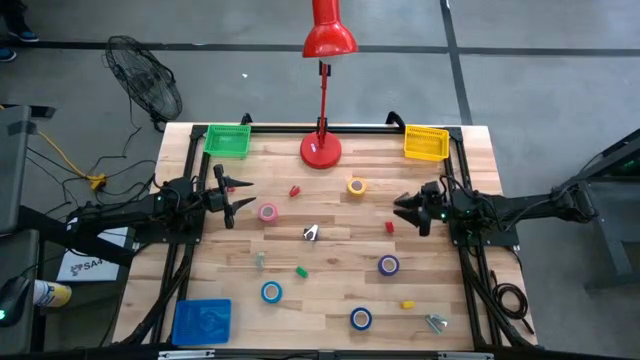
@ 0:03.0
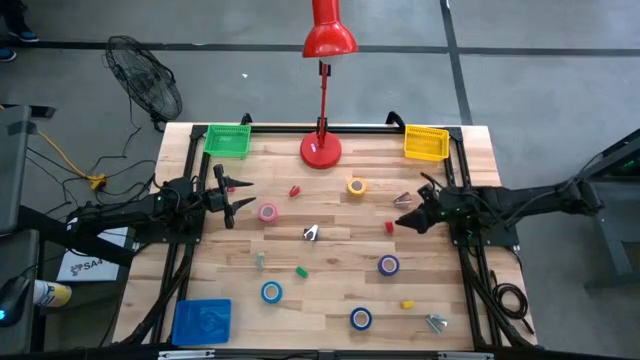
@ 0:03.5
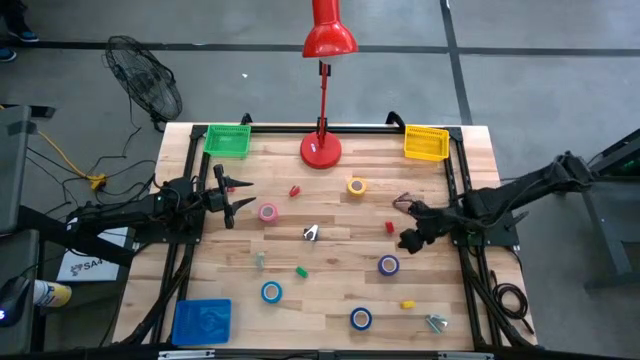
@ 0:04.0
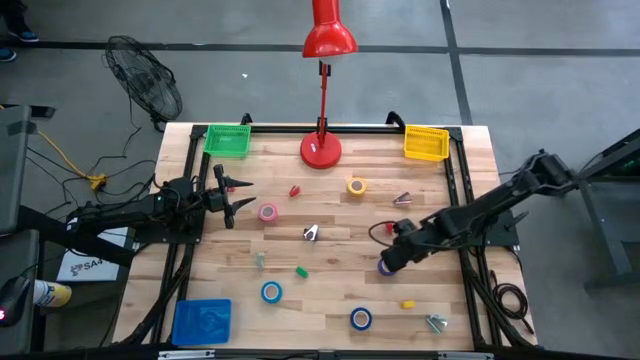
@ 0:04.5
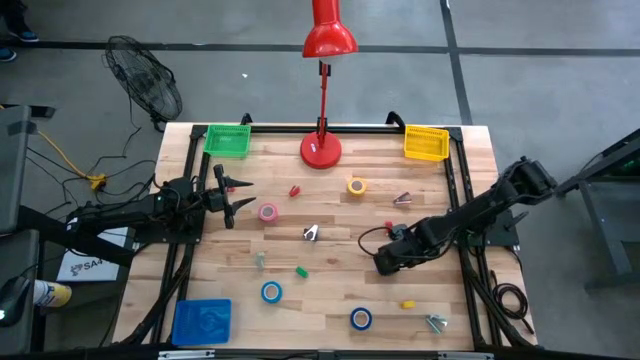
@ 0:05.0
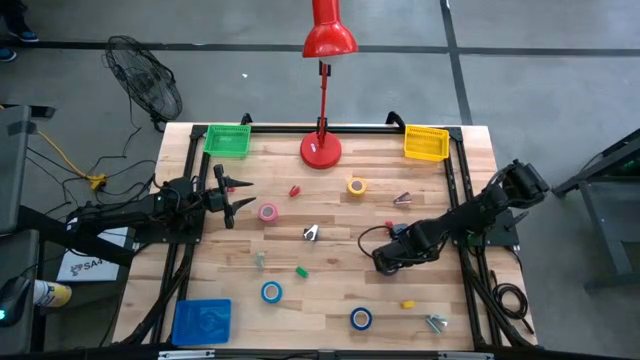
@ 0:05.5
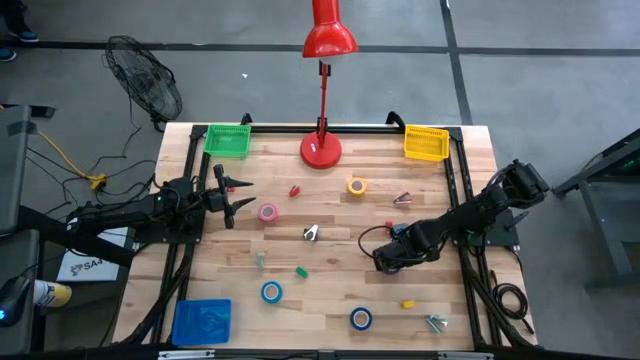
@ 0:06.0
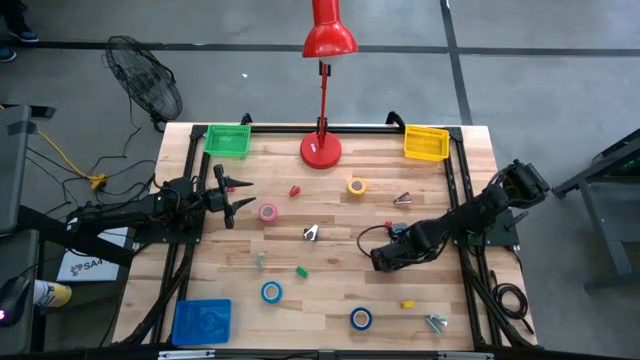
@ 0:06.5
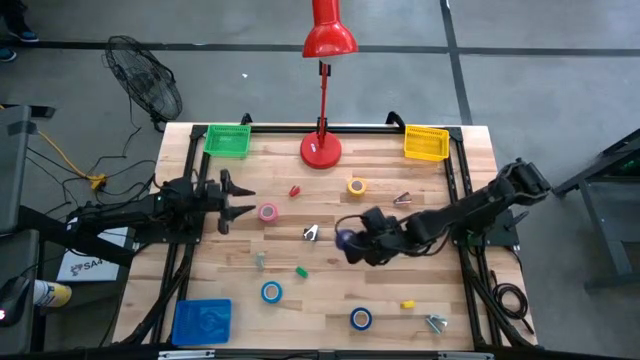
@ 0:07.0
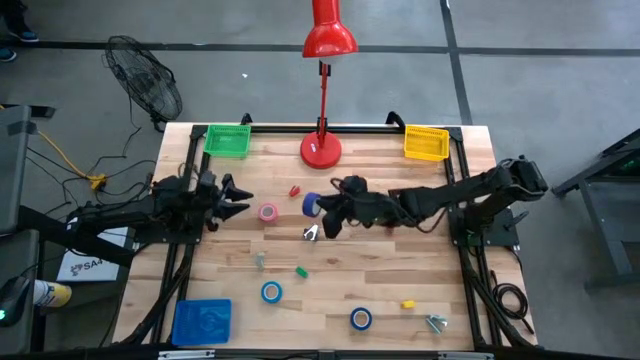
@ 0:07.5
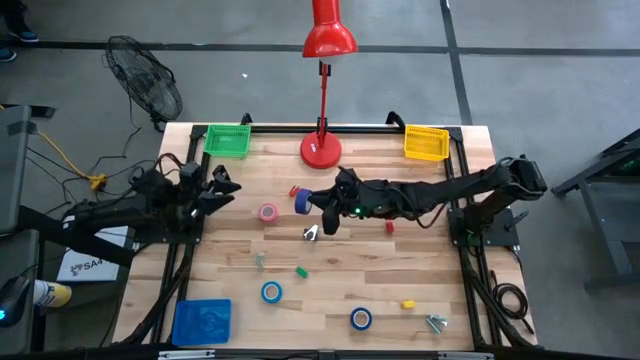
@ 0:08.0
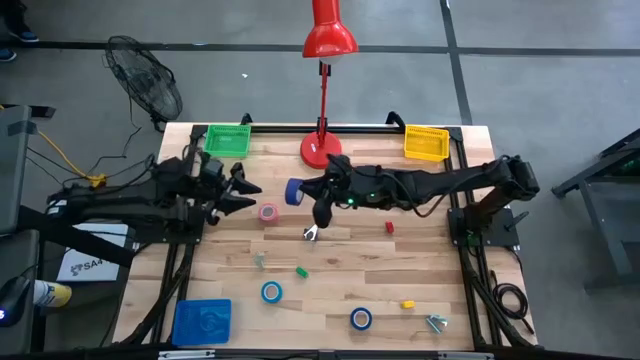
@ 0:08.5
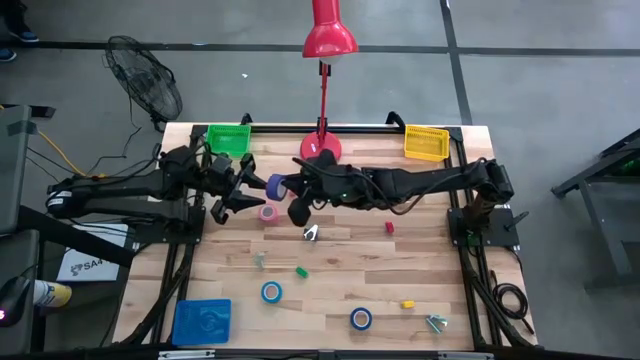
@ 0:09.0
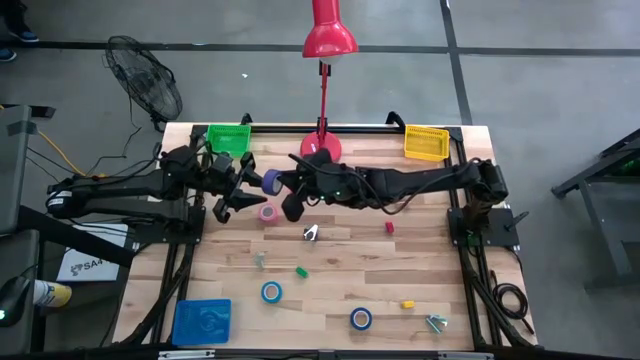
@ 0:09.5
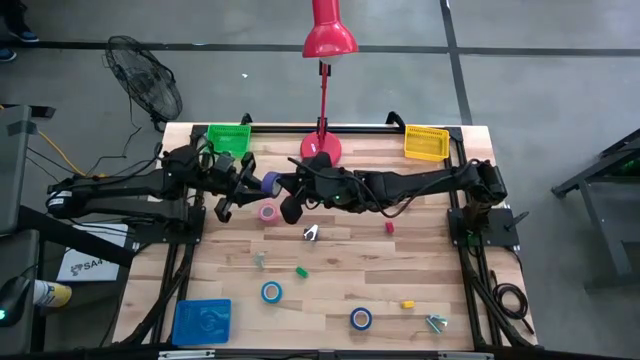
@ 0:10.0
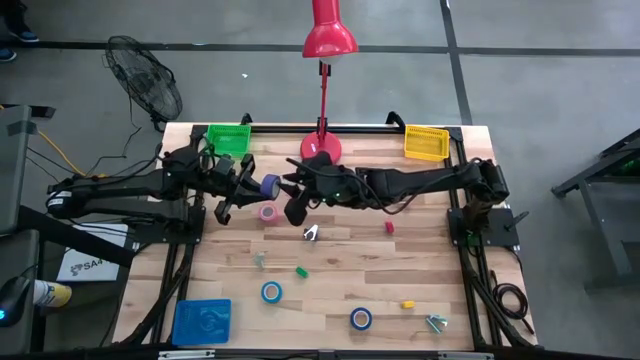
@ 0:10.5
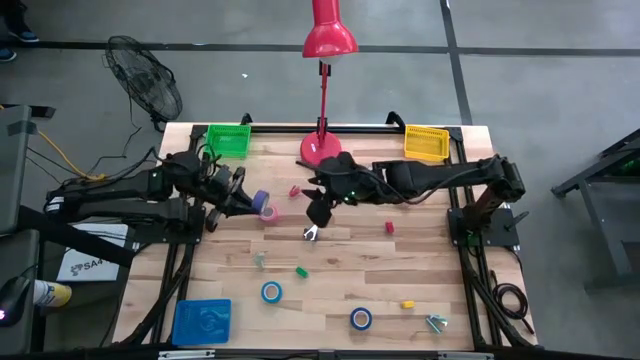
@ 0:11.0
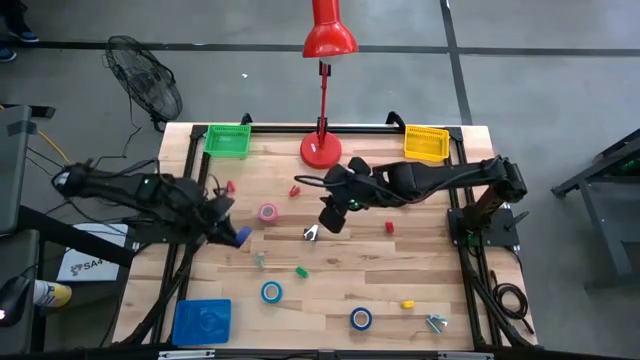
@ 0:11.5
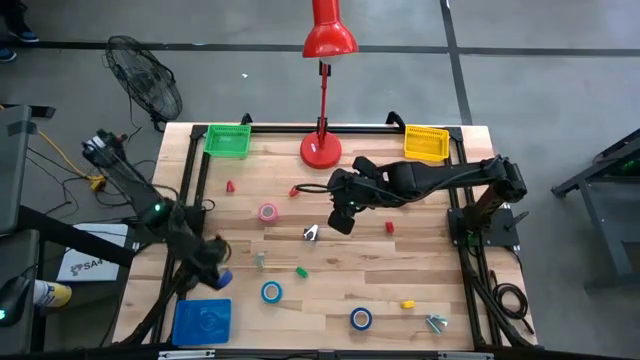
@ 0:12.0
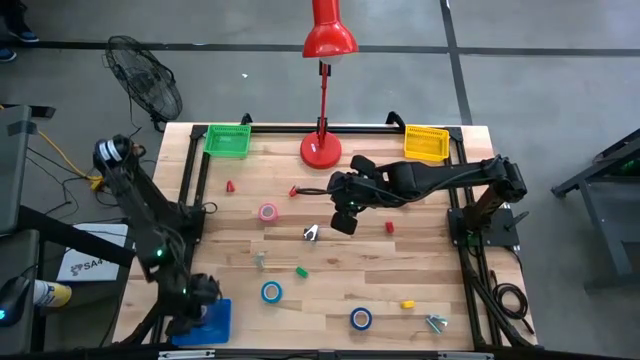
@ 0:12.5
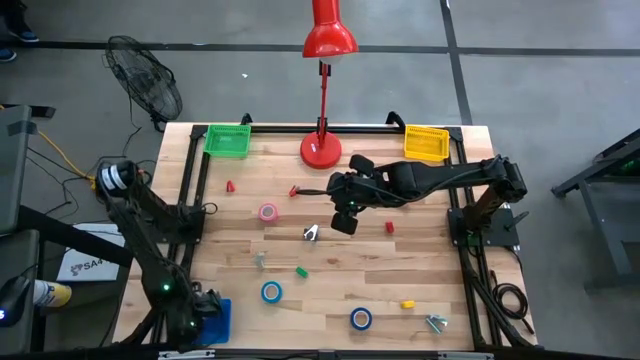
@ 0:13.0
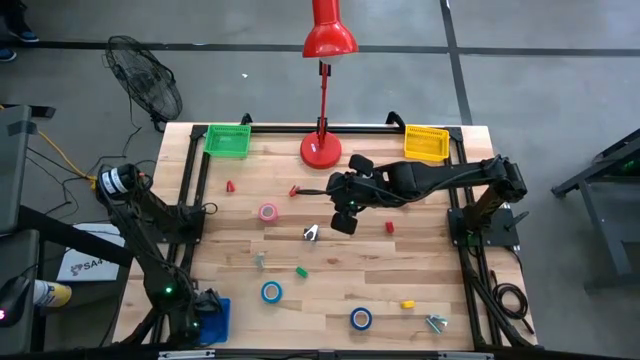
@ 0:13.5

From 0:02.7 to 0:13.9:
Task: Pick and place Stapler, Stapler remover, tape
Put the purple tape into the blue basket

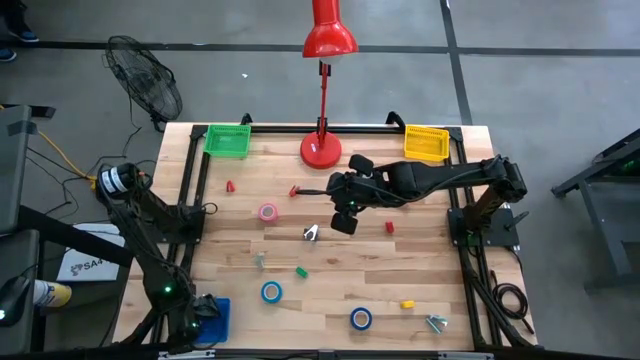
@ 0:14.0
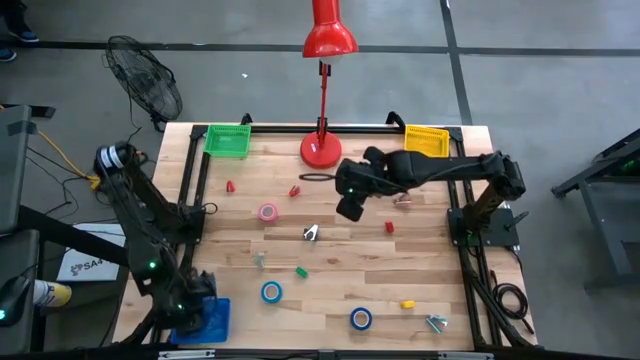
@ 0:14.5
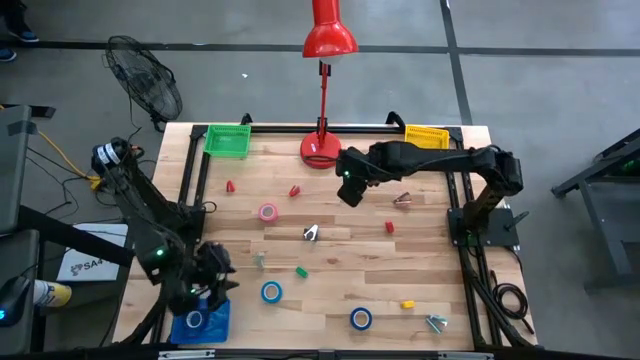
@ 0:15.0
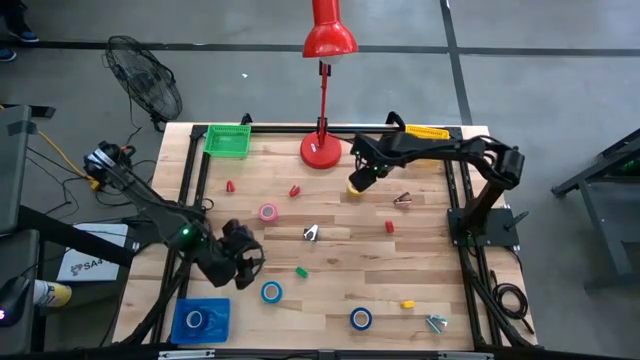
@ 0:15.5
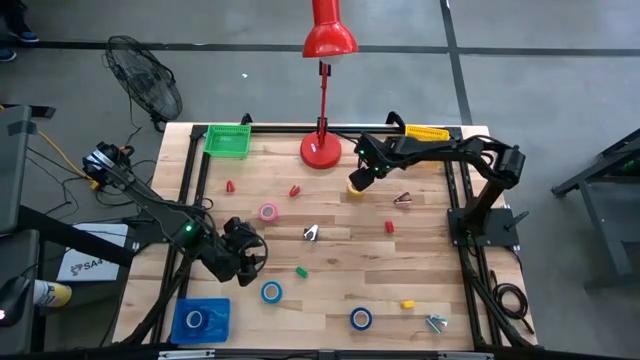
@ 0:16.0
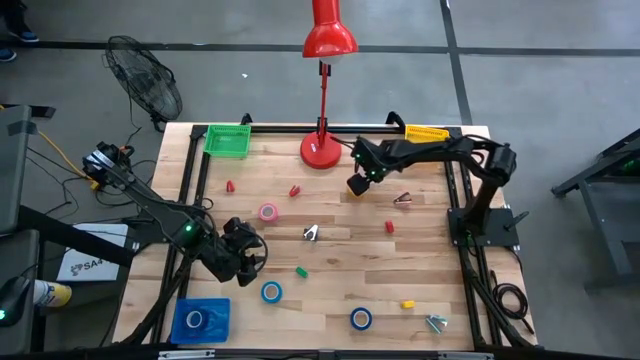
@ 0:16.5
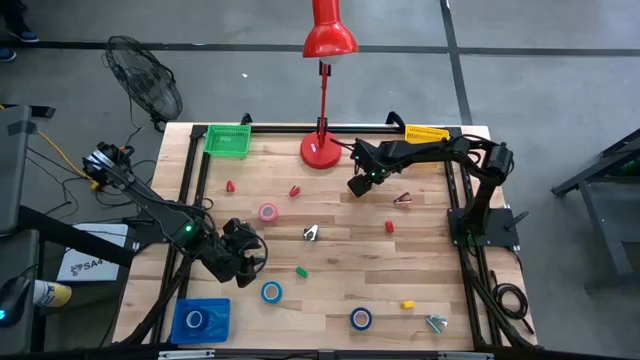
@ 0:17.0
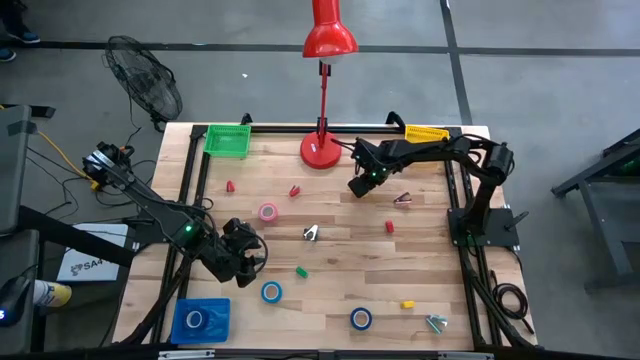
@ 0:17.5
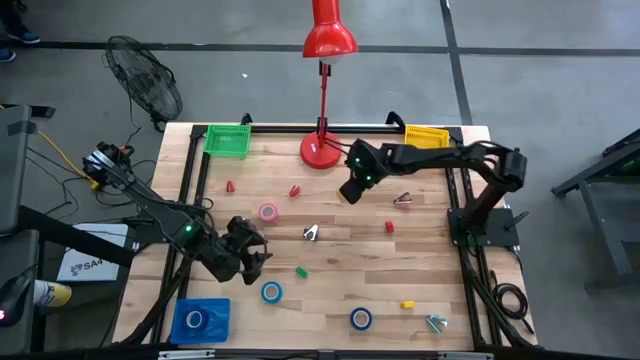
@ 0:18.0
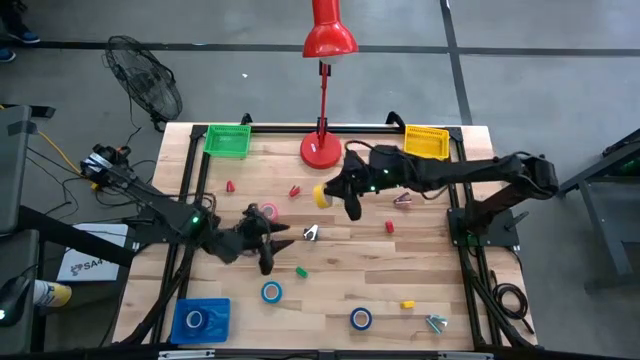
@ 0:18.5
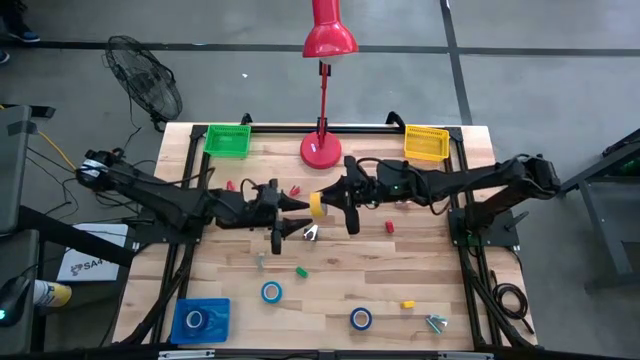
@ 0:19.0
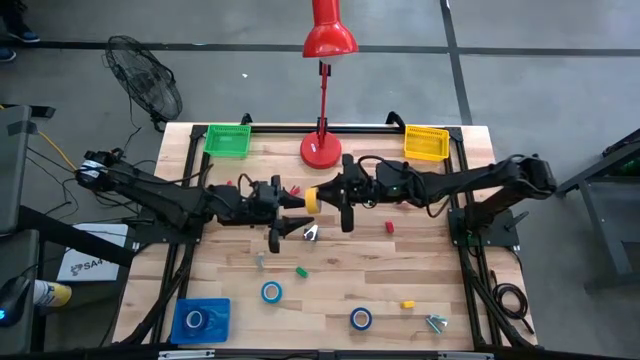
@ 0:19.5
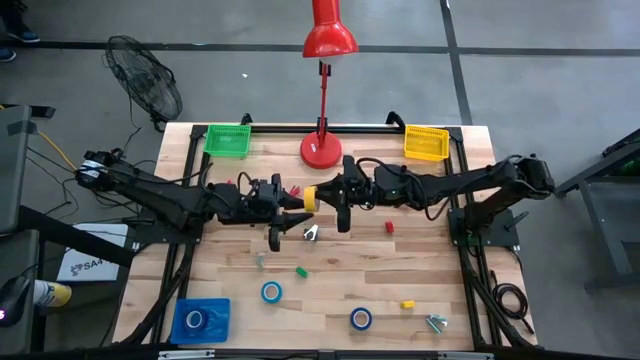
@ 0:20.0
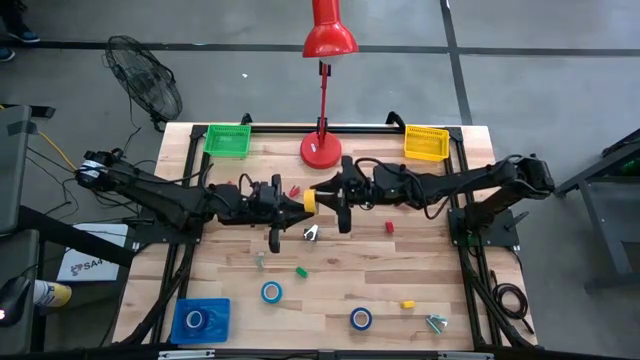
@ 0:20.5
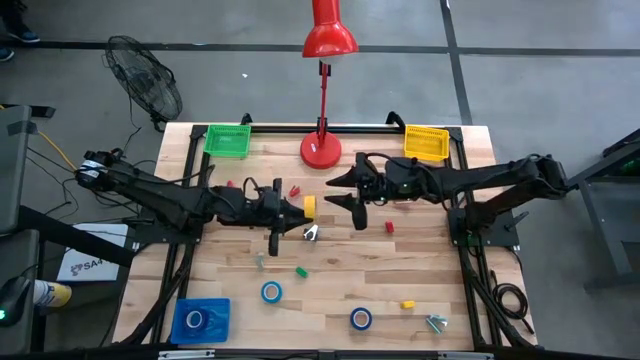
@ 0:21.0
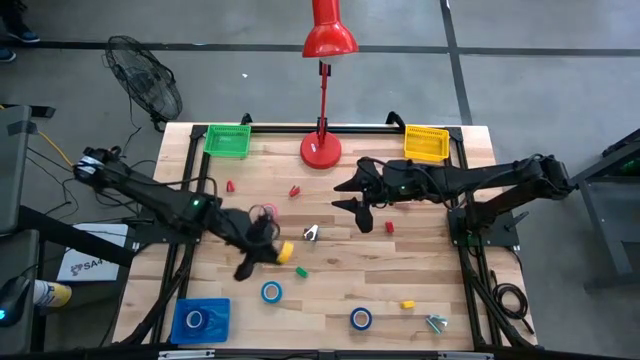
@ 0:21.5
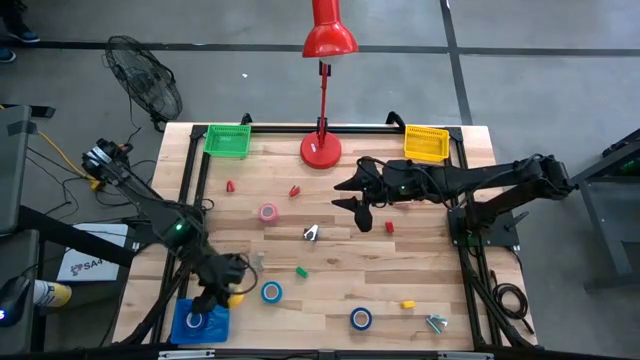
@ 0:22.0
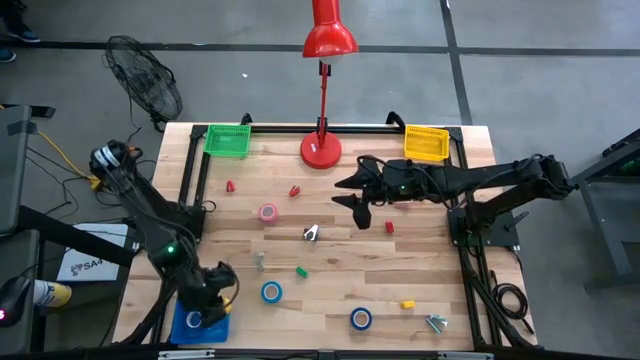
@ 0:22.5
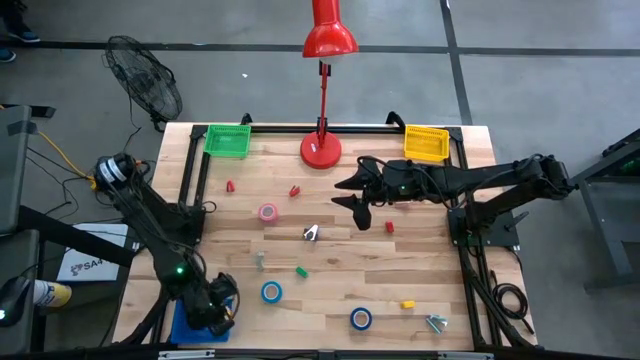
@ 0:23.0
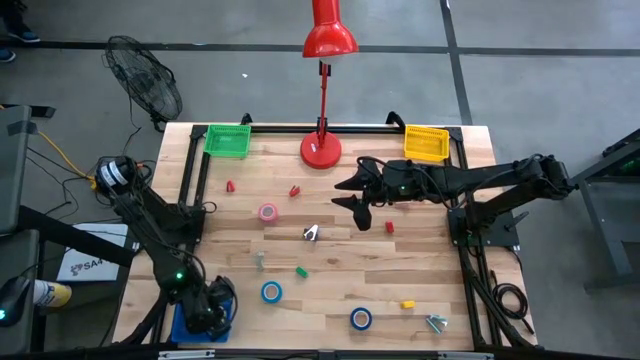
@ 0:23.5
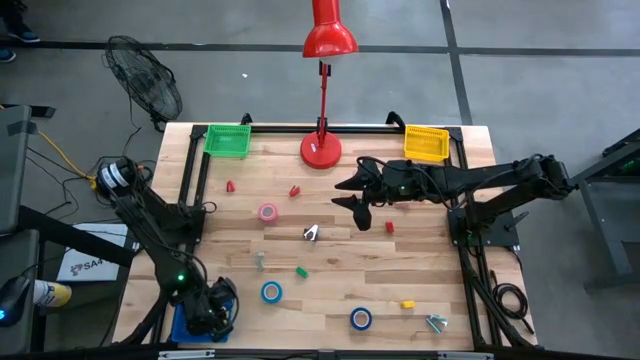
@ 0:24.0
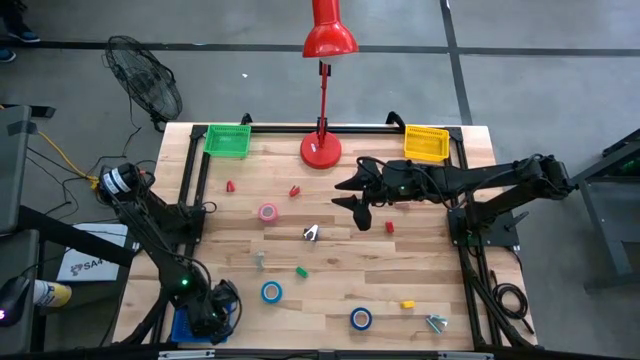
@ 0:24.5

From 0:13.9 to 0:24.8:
Put the yellow tape into the blue basket
